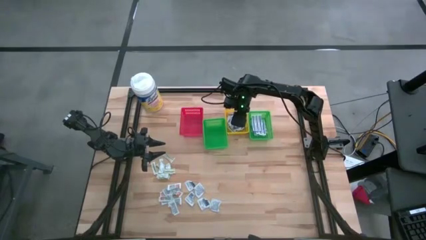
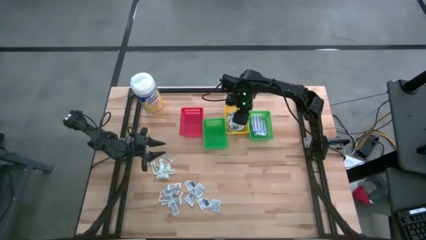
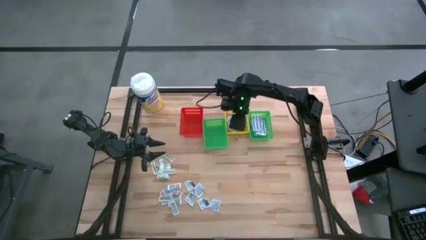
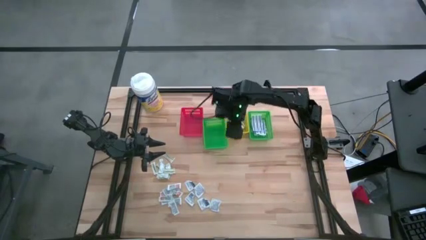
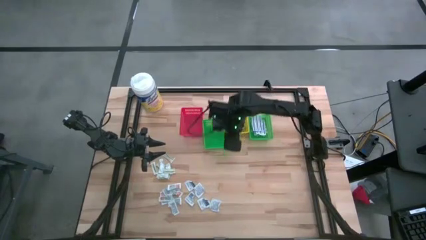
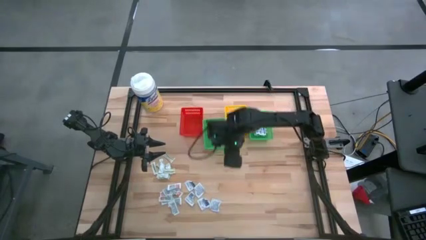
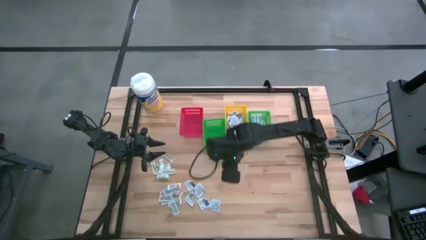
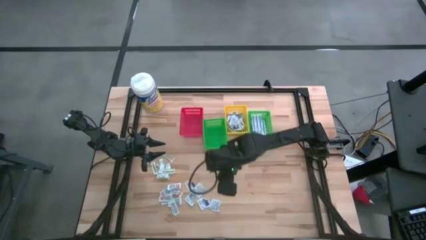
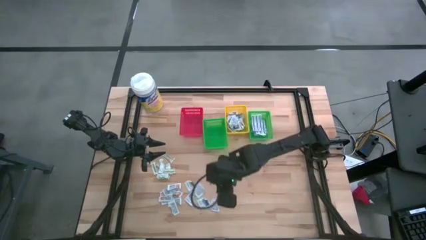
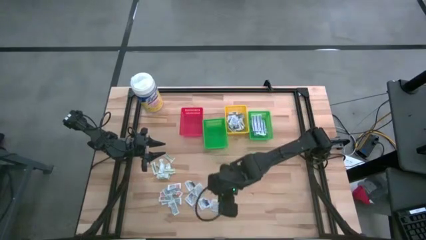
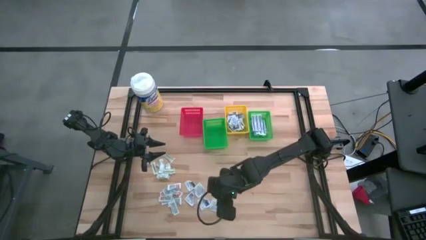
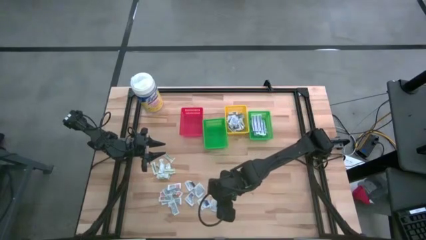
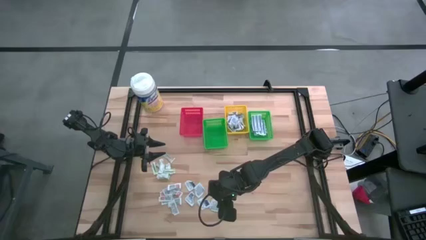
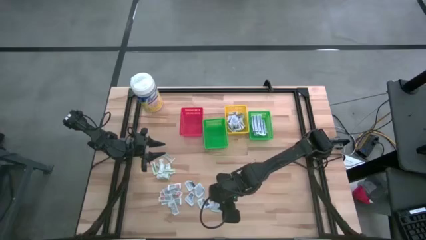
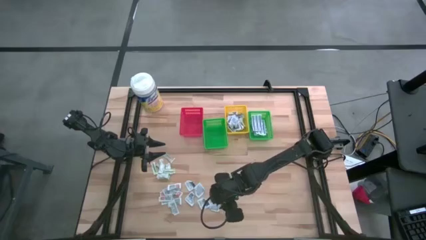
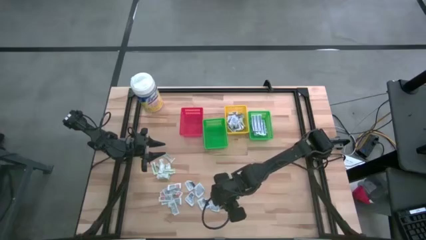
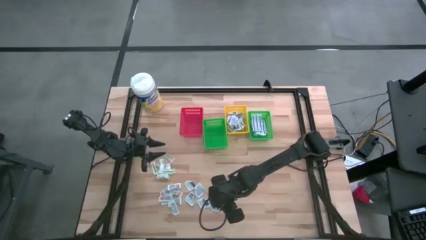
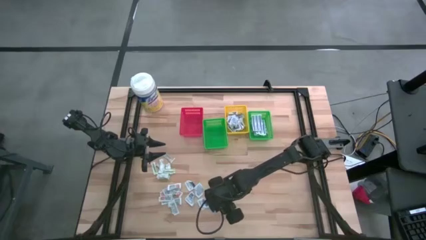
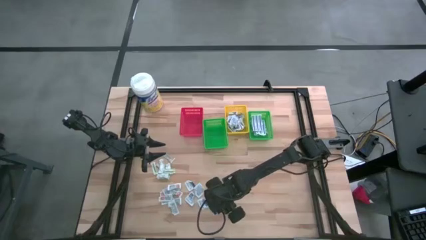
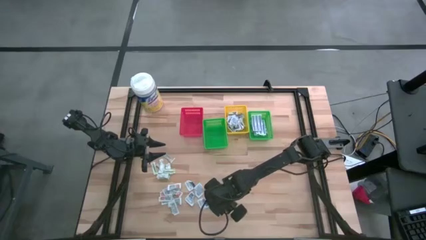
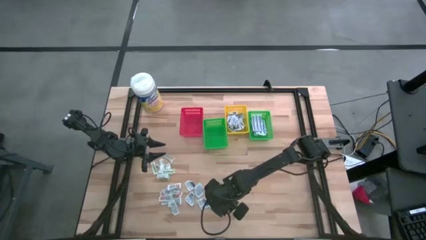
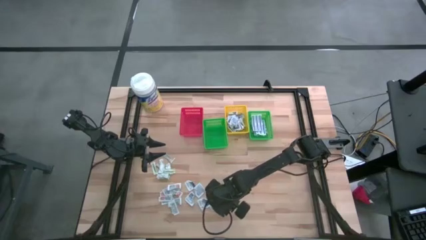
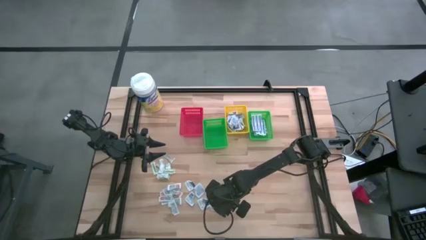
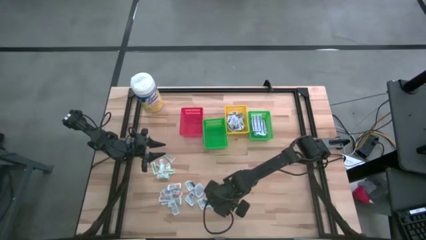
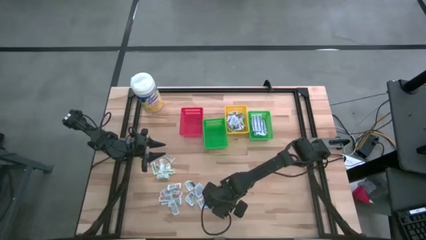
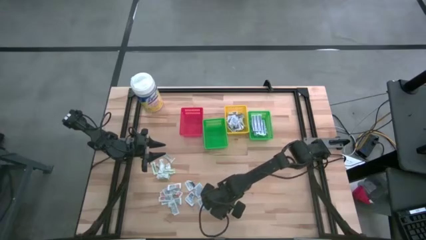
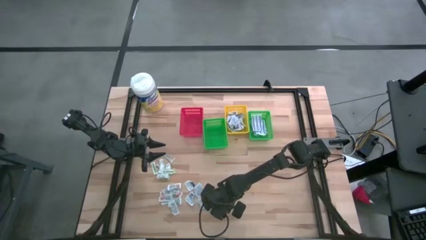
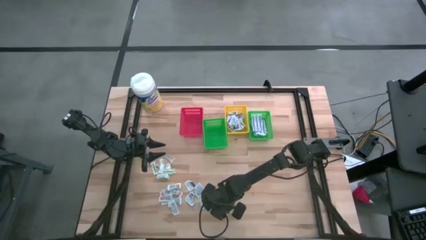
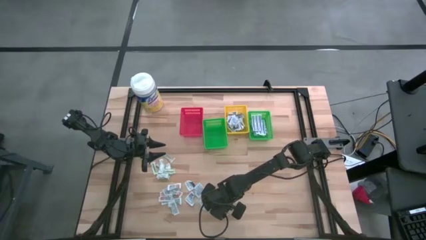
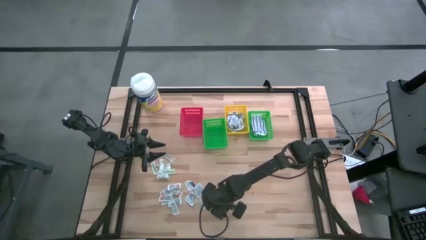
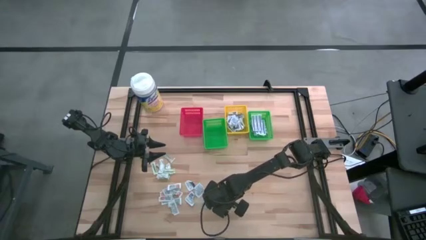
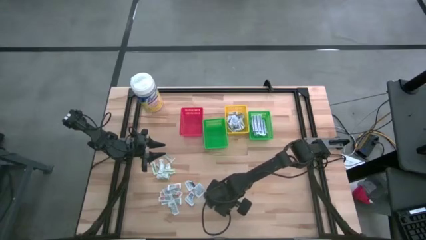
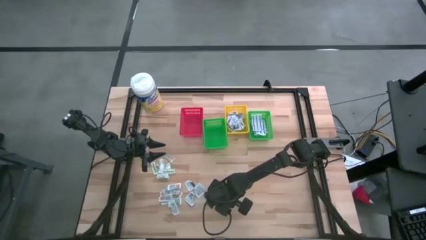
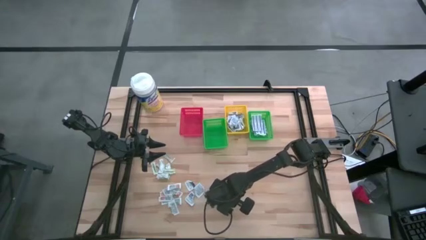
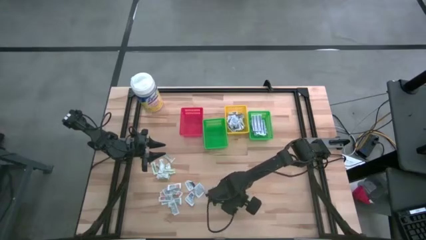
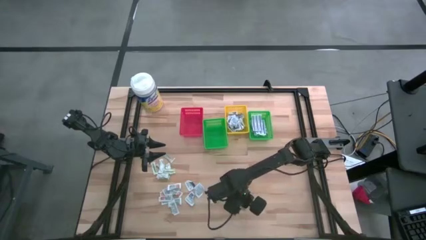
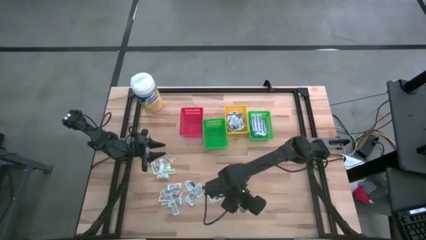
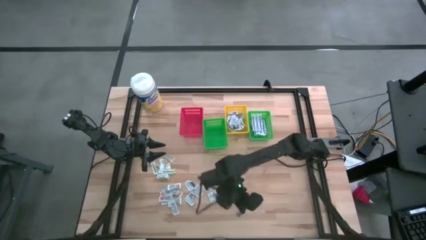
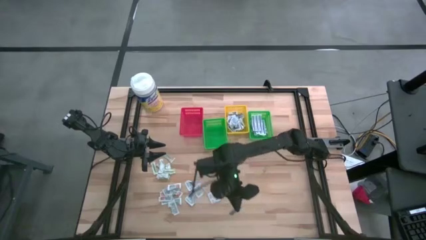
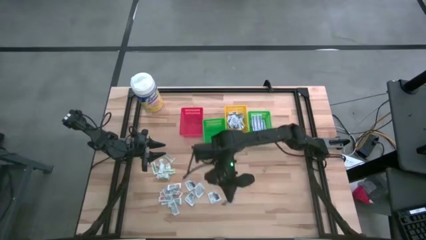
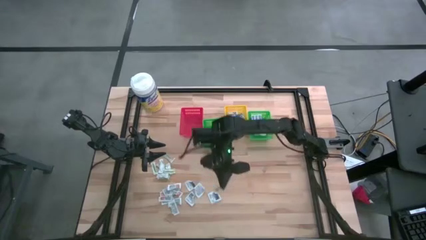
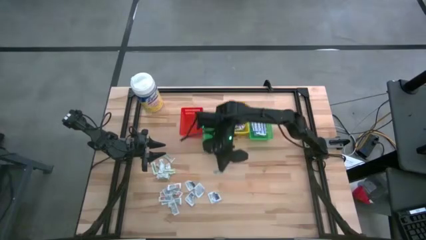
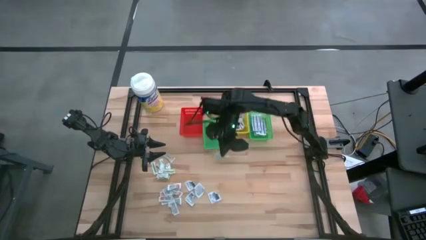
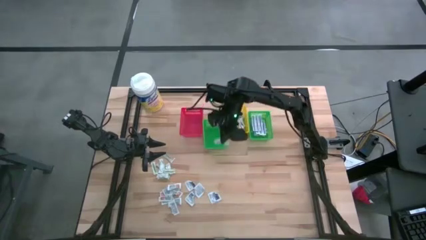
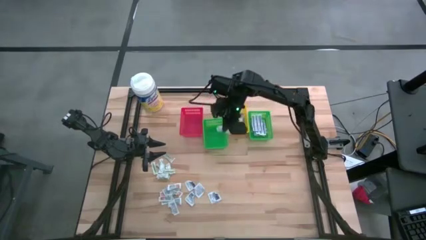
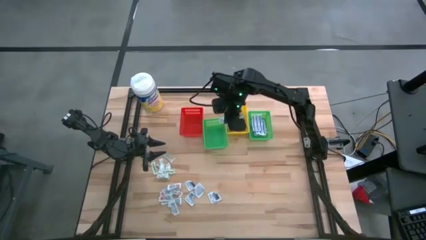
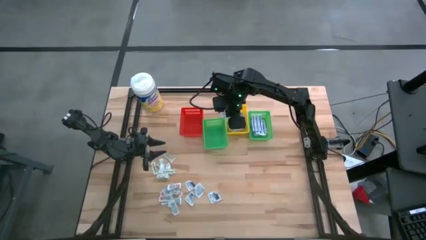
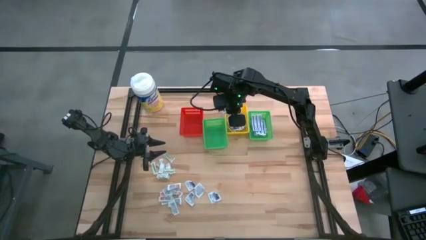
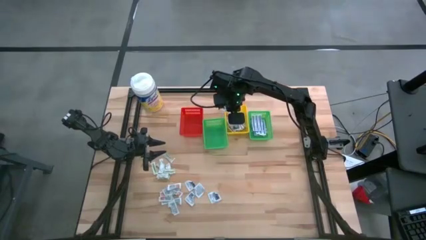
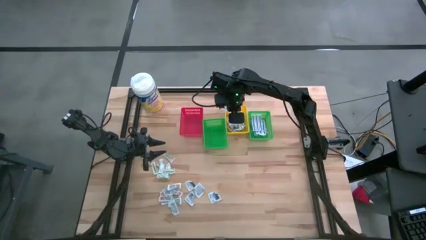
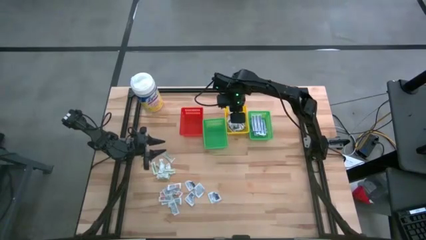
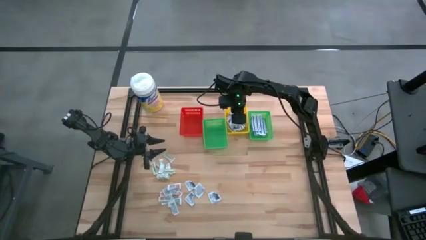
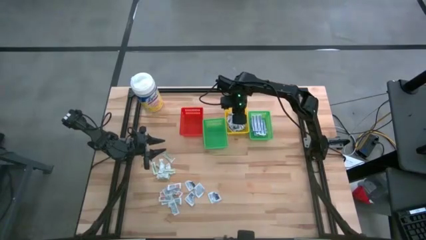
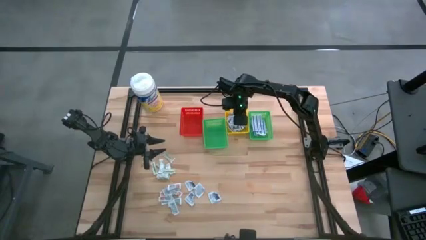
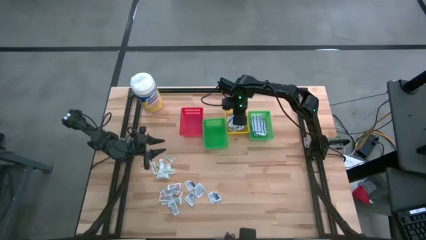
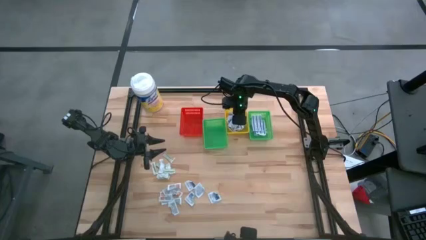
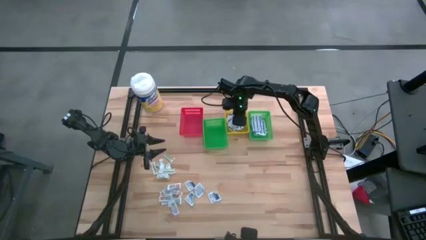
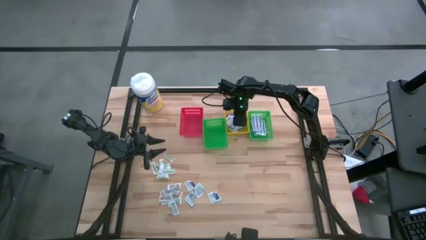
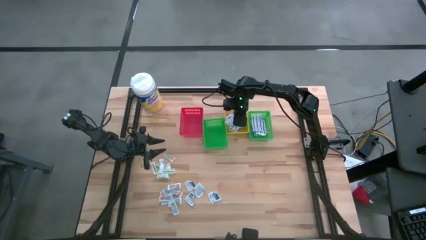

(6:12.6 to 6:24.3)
Task: Pick & Place First Aid Supplies
Put the alcohol pad into the yellow basket

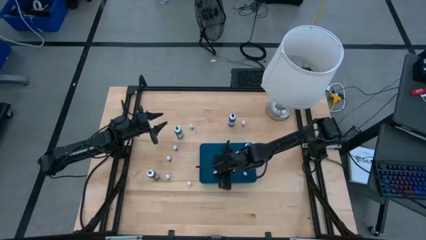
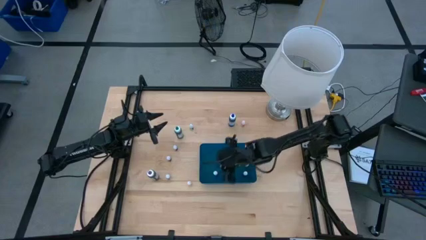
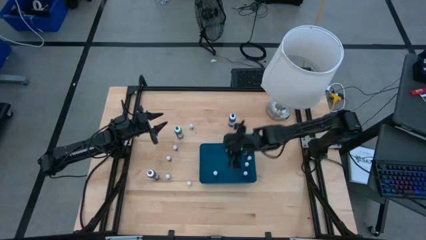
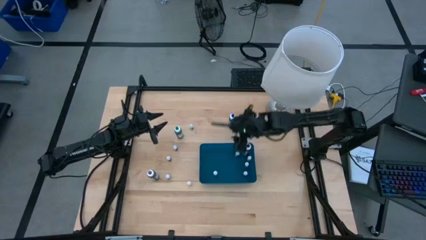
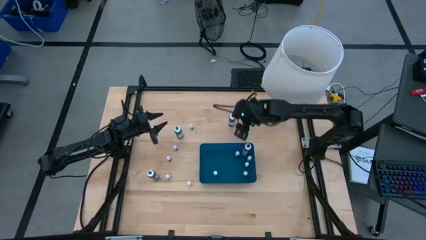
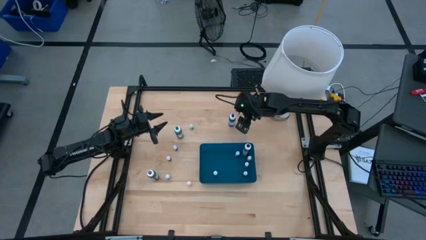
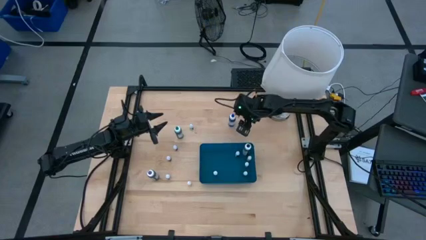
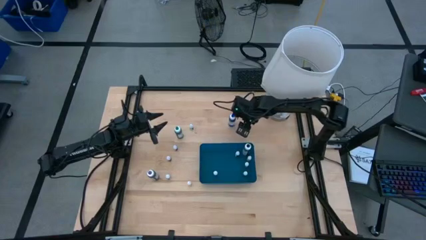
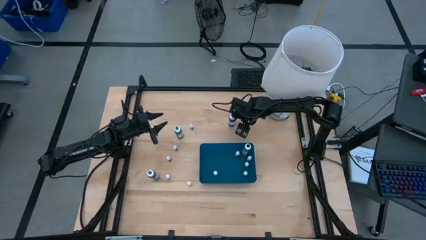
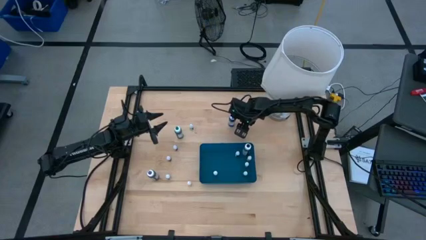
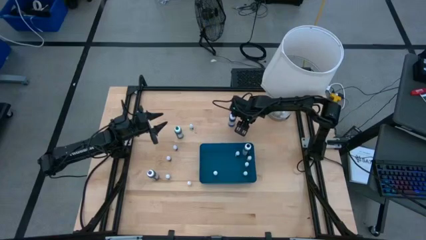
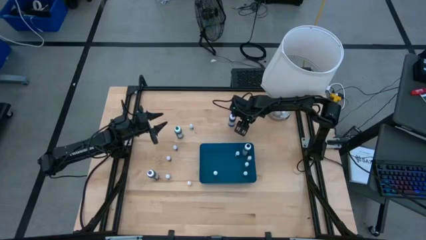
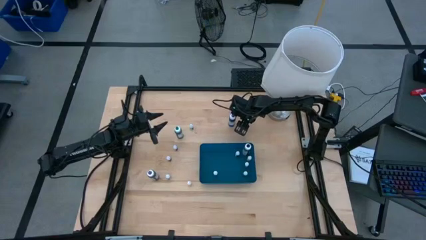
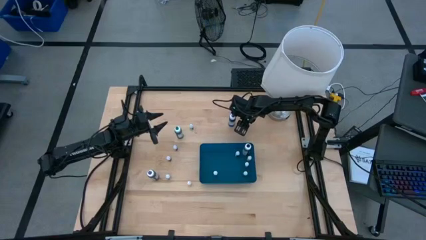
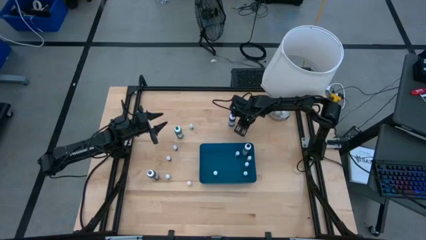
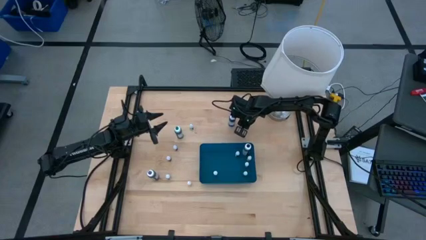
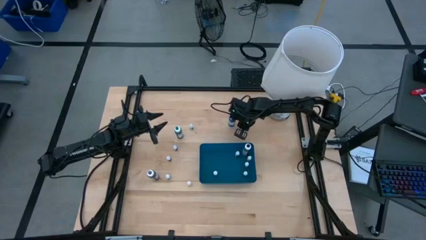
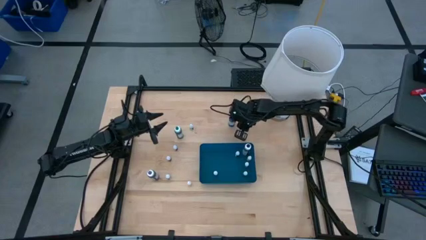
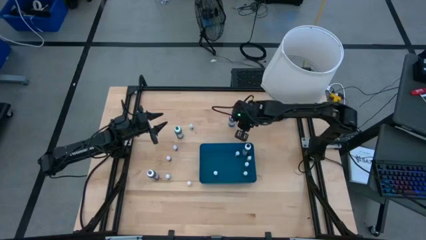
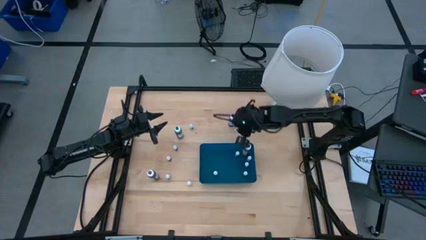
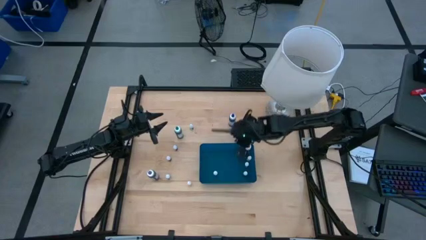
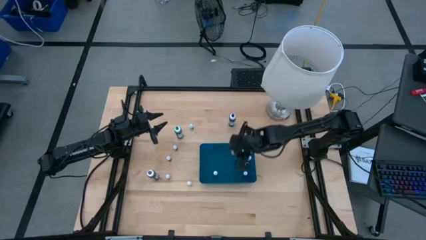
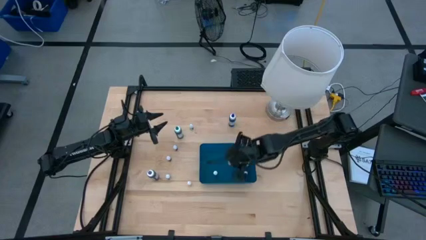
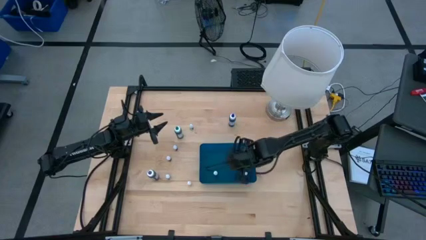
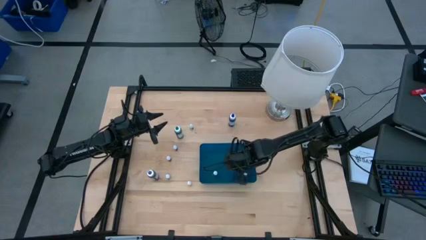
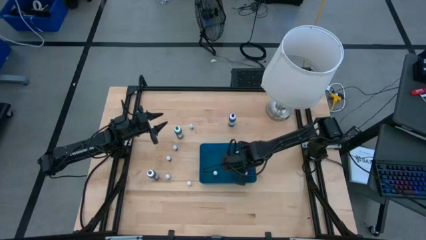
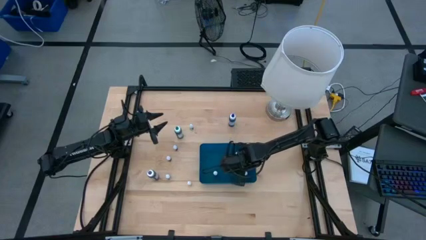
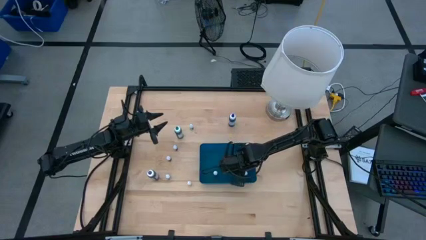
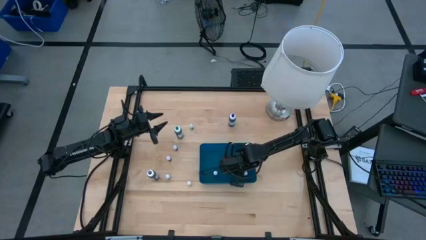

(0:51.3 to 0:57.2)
Task: Pick & Place food coloring
Put the small orange food coloring bottle into the blue bin
